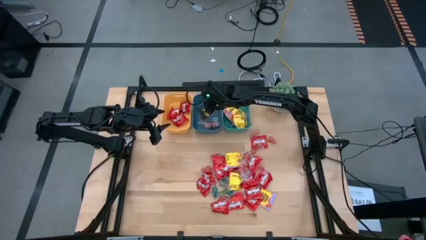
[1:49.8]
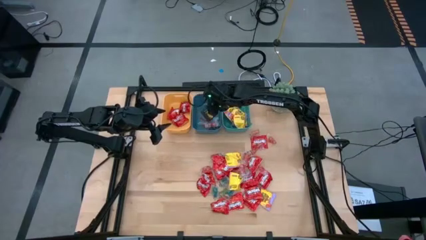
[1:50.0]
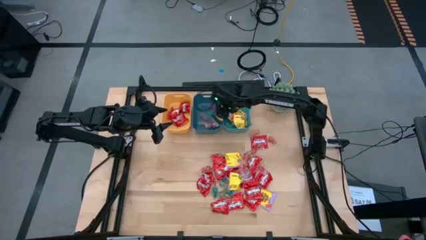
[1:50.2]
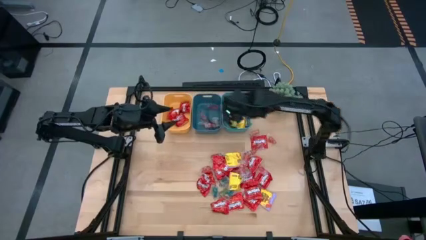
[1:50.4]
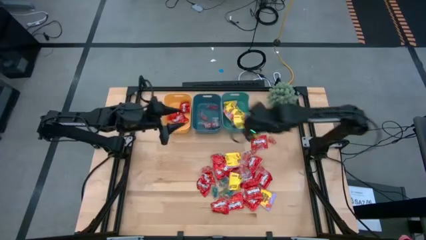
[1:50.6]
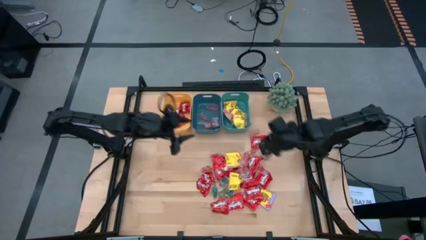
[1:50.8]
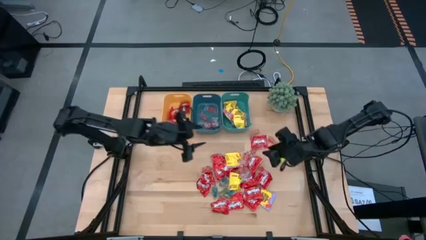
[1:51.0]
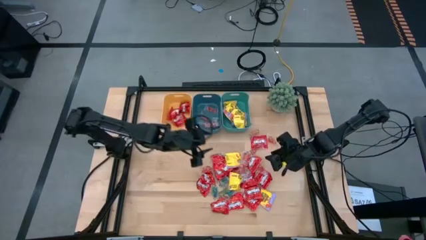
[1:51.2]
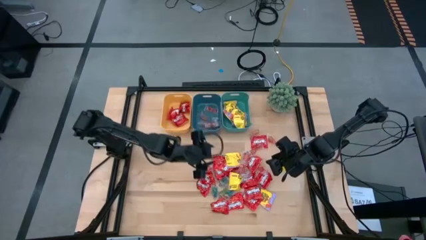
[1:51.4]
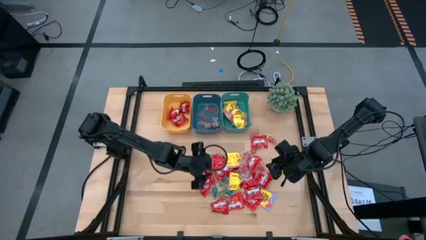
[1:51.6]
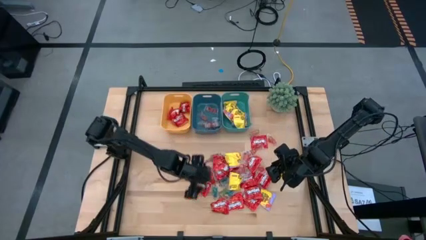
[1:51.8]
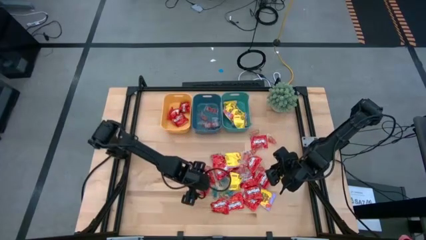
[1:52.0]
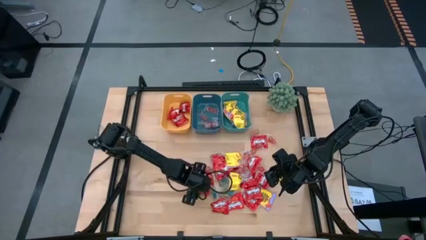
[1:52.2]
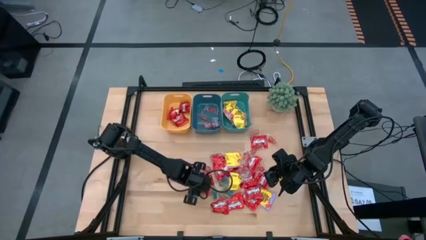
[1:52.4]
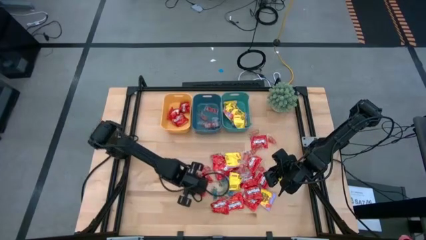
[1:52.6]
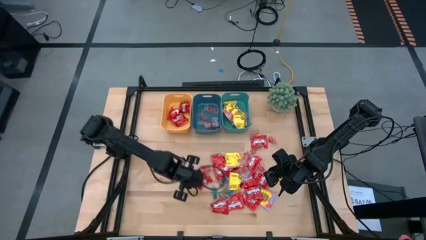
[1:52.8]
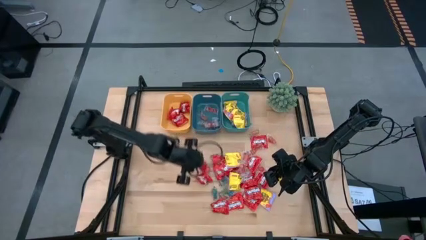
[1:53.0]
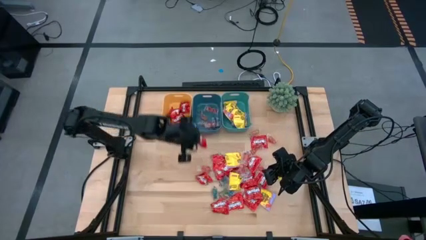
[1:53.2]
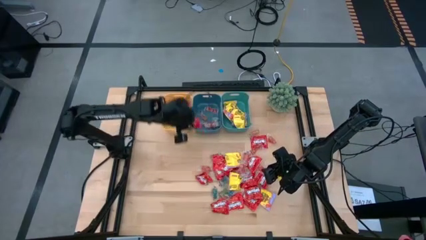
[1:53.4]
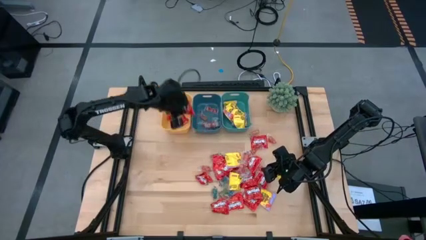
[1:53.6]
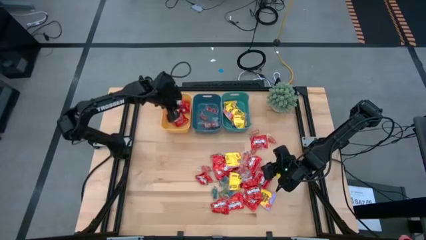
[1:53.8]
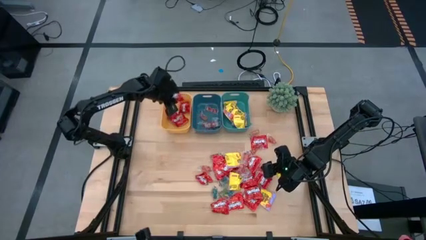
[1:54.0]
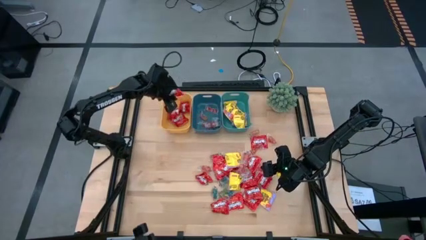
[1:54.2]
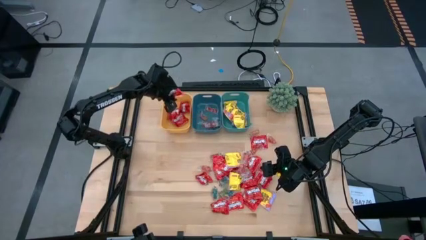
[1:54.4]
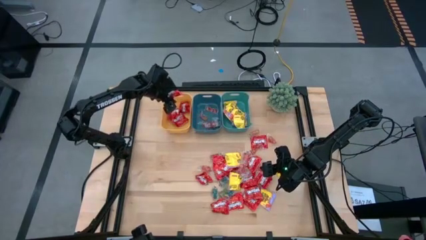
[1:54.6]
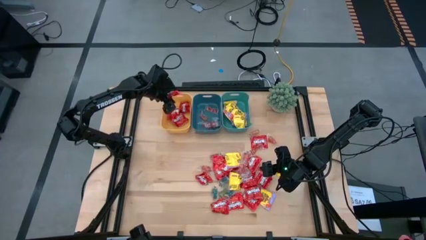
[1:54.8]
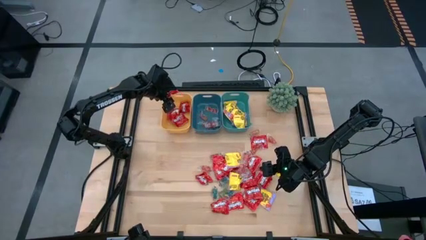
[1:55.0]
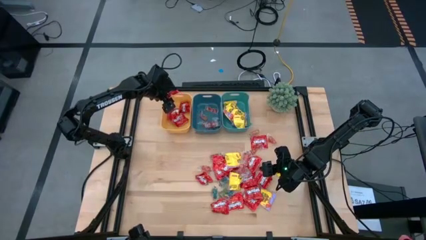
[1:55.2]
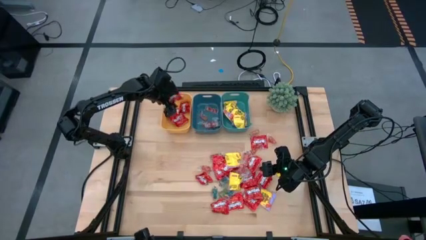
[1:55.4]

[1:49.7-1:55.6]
Task: Sort candy
Put the red candy into the yellow bin

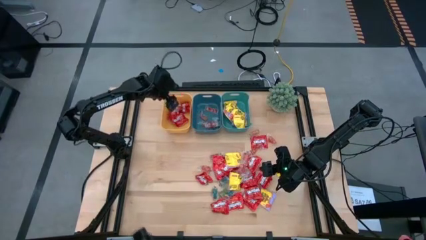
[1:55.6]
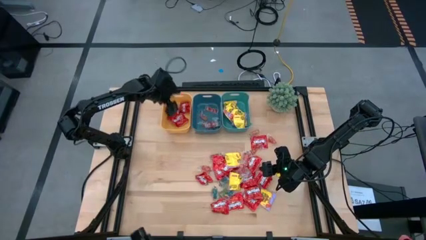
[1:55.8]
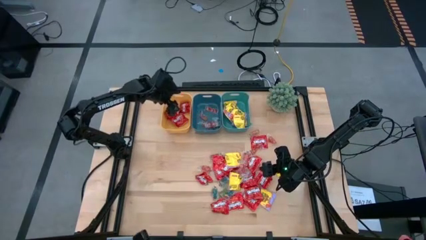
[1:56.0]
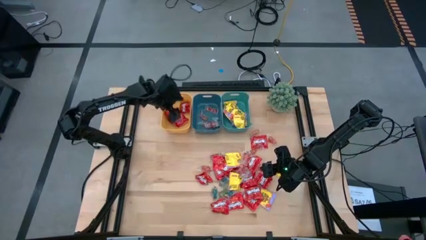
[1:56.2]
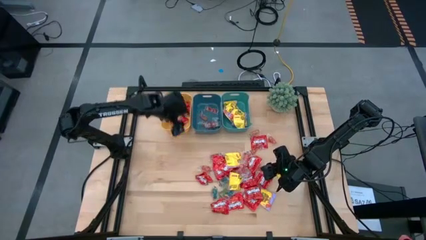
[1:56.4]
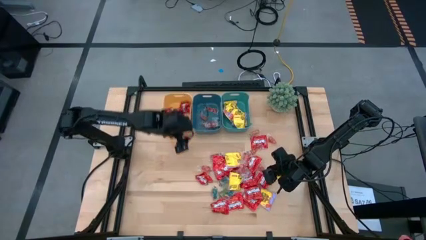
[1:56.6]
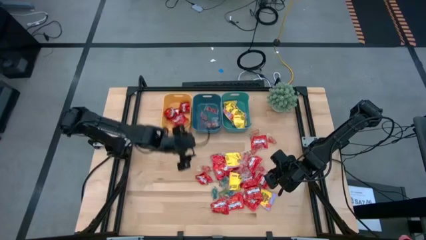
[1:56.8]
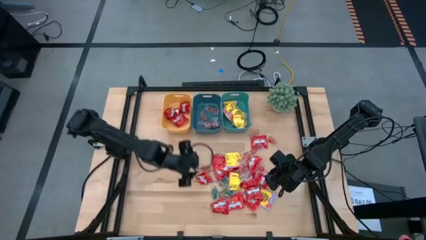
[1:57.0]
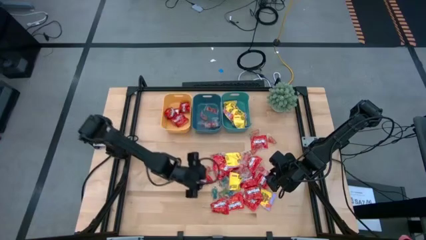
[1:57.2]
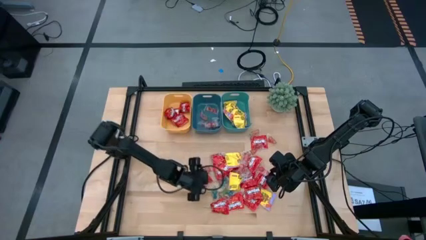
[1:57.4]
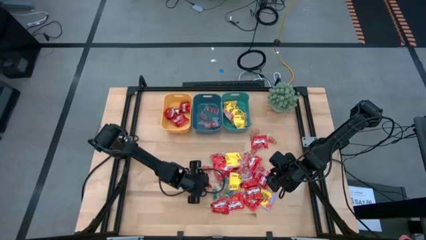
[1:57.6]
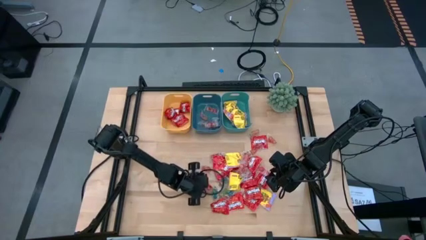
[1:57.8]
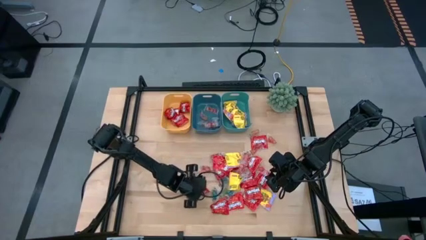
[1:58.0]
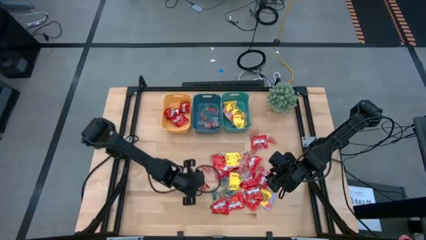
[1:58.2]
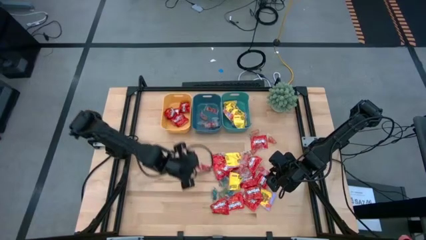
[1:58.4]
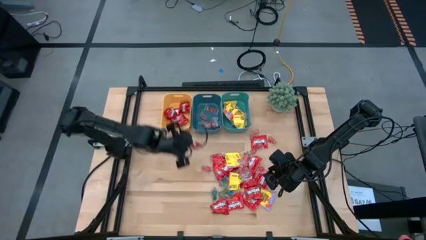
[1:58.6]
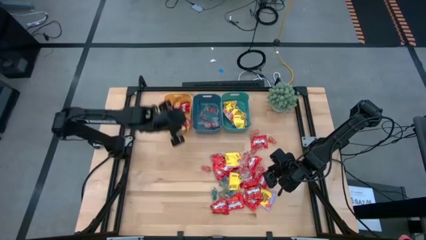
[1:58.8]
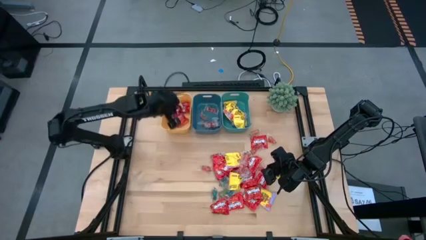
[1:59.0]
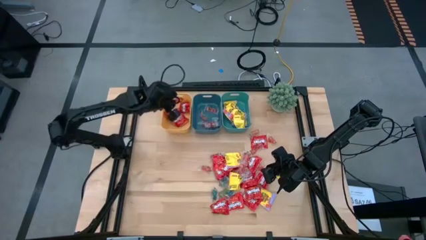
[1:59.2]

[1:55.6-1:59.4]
Put the red candy into the yellow bin

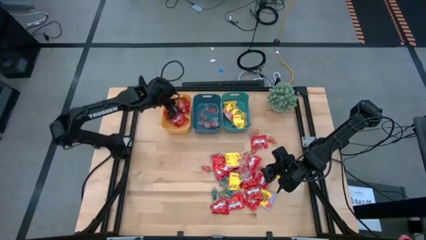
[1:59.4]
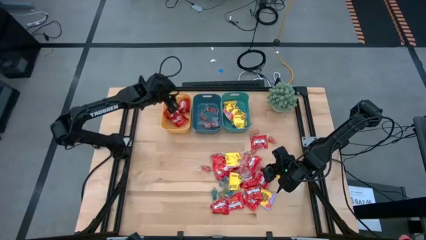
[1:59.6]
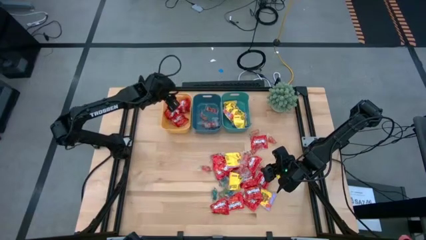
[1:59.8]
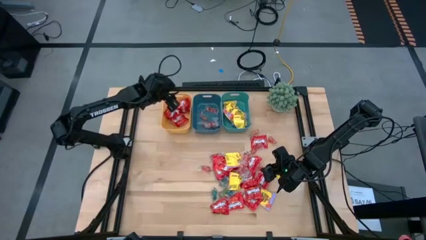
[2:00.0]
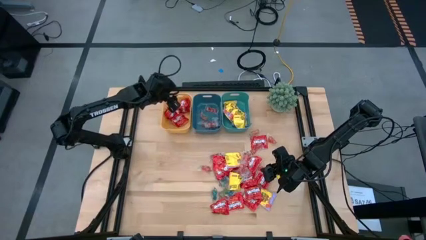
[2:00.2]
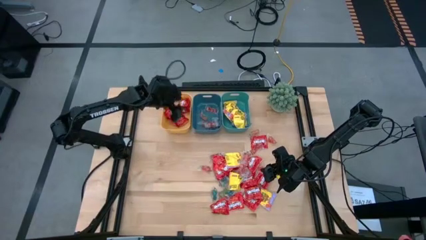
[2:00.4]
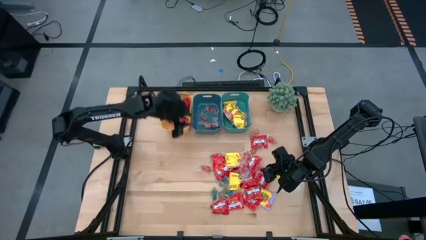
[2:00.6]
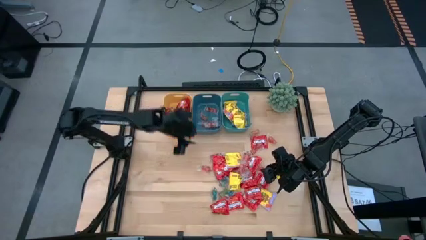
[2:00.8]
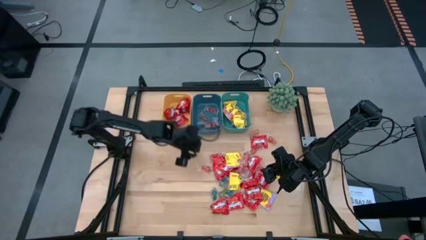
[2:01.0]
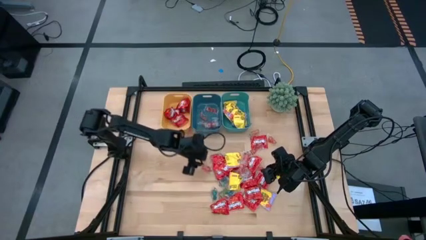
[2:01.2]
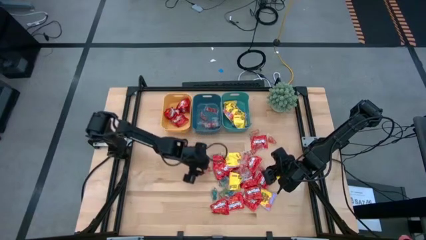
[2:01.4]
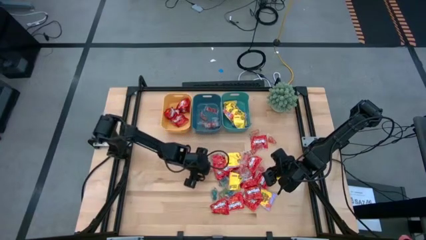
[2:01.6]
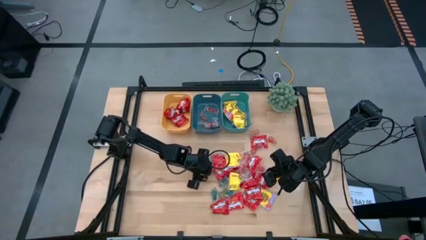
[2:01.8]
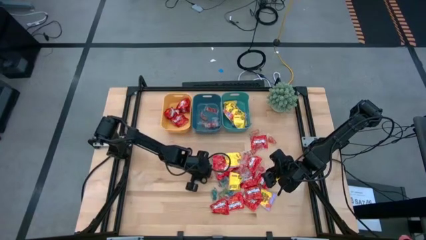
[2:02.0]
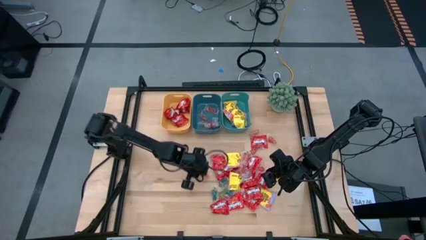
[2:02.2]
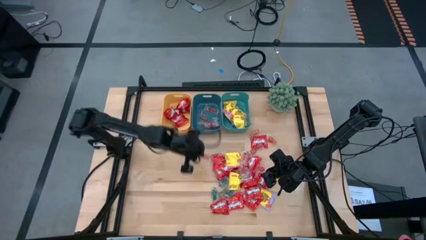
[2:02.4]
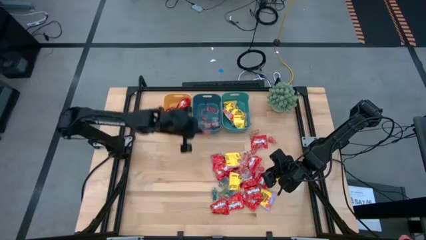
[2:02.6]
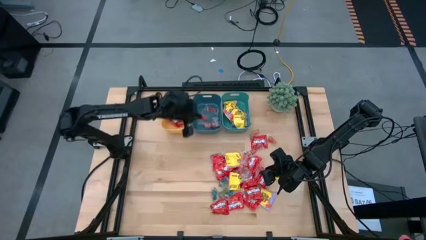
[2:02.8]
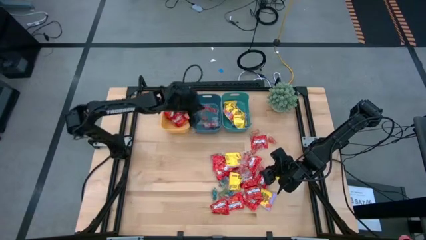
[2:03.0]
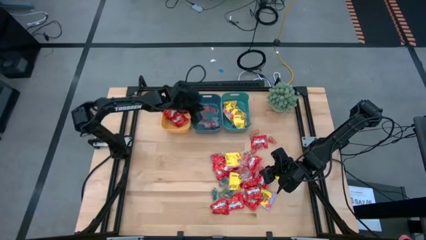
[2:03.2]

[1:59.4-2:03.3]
Put the transparent red gummy into the blue bin

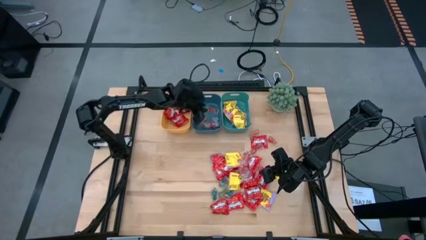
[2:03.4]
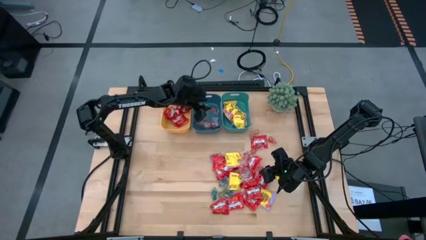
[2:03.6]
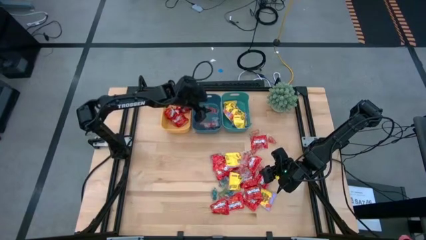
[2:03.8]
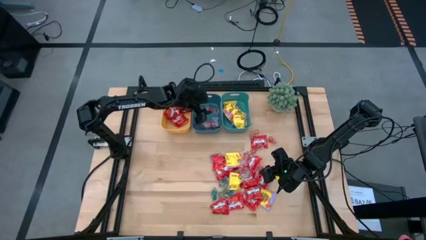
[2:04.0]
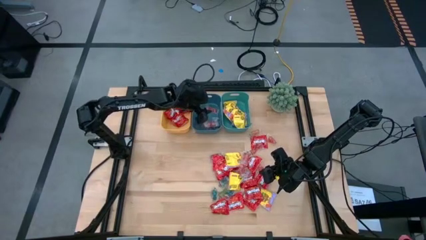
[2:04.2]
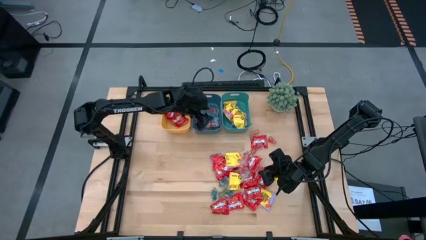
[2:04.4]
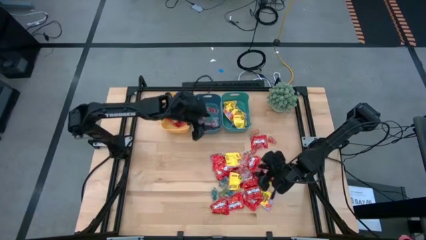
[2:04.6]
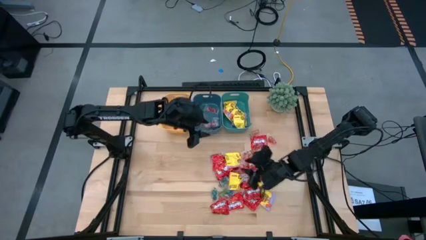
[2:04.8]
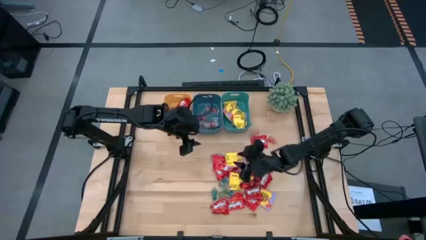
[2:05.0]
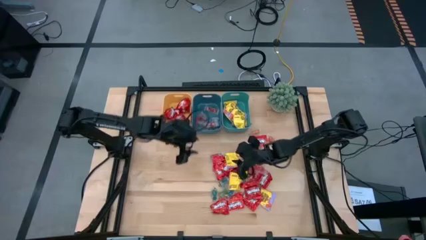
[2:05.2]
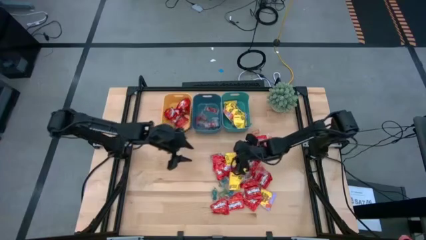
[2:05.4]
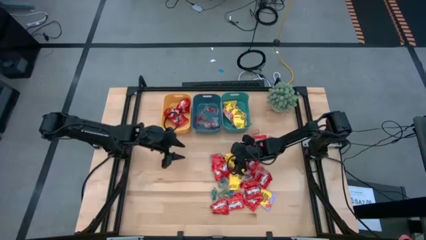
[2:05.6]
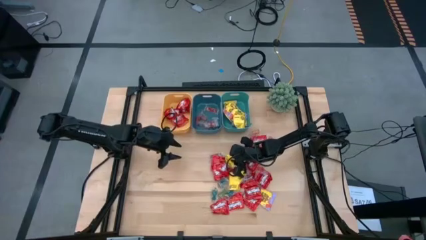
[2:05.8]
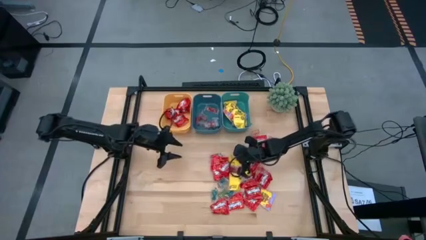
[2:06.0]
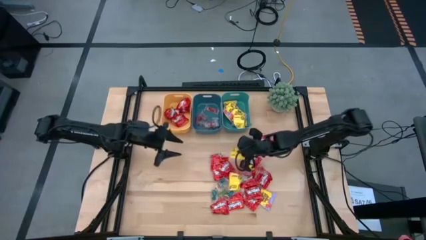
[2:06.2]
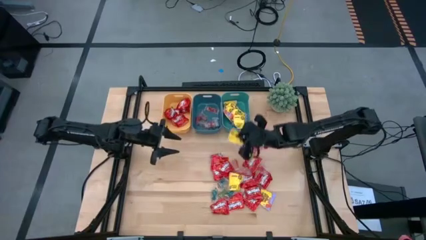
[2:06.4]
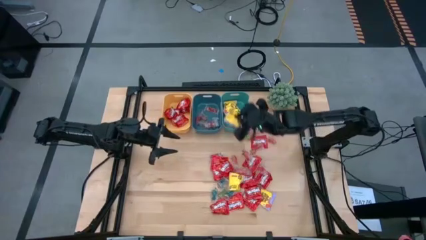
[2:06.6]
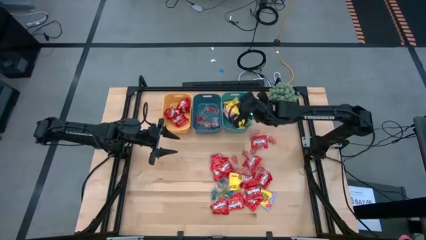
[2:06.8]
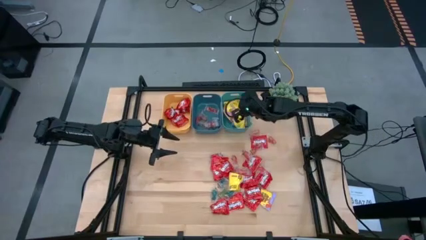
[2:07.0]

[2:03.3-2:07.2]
Put the yellow candy into the green bin
